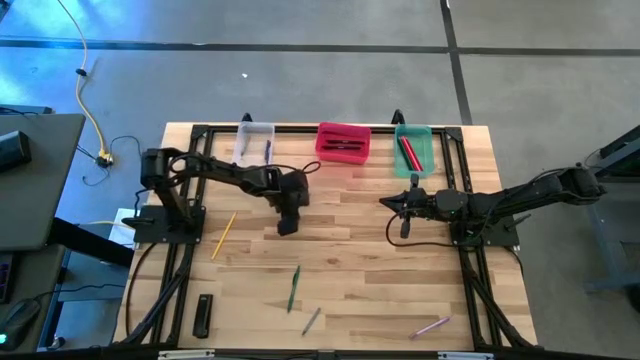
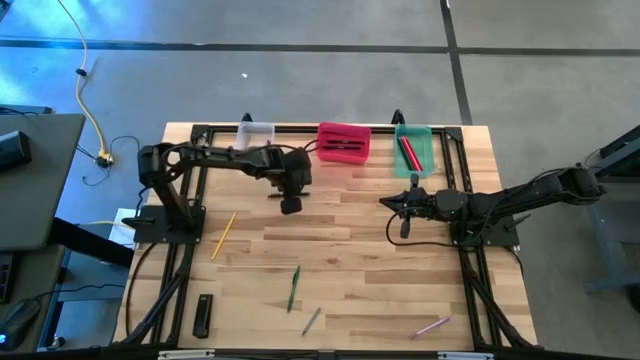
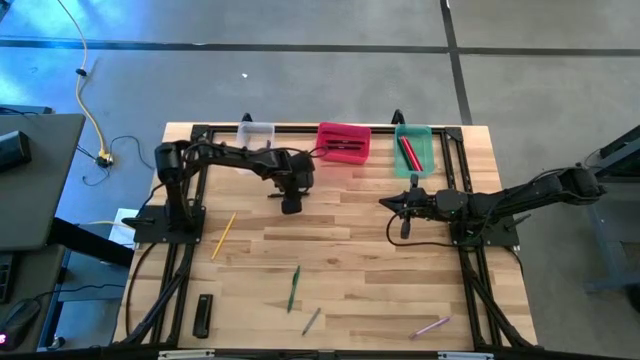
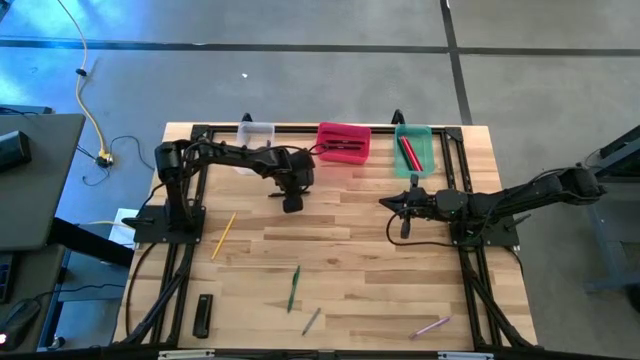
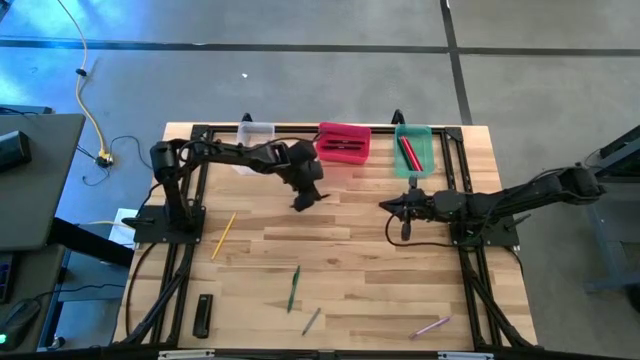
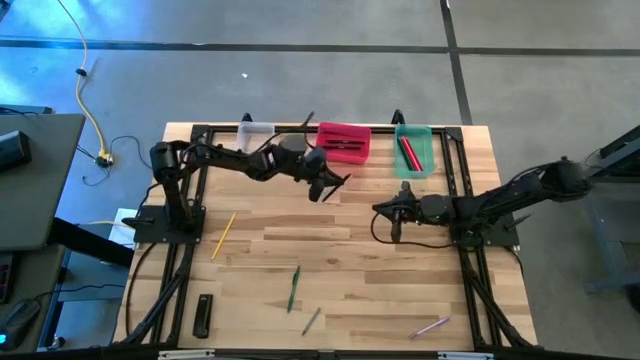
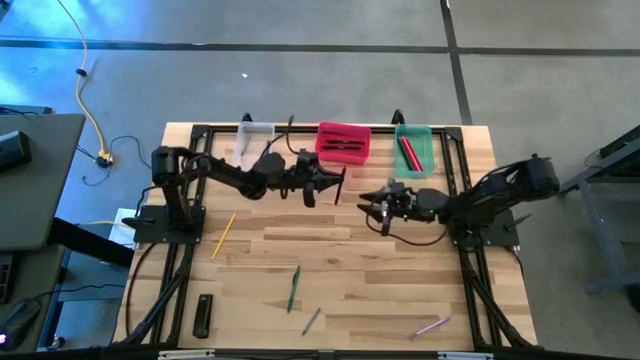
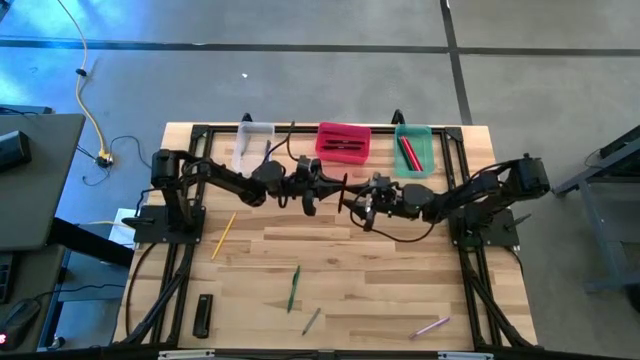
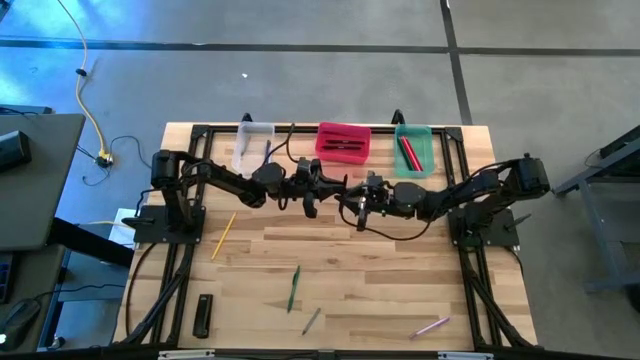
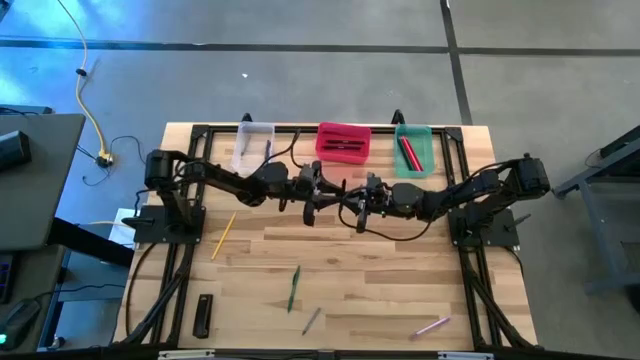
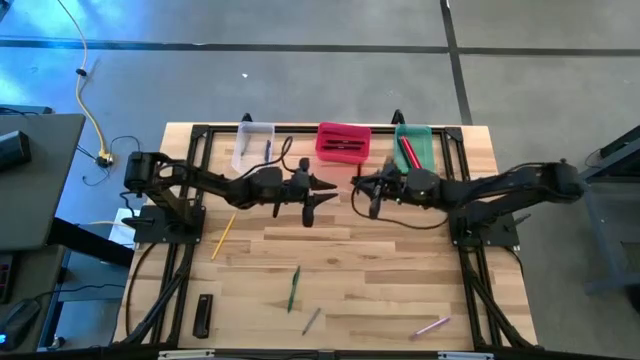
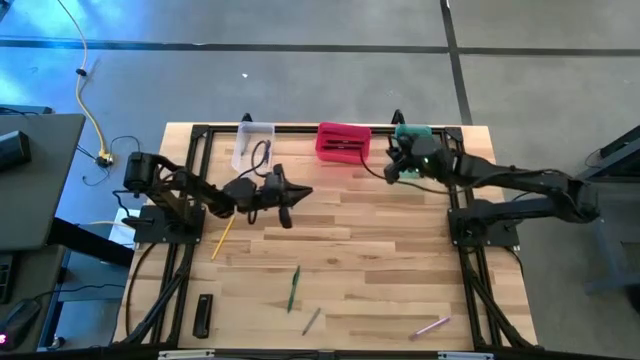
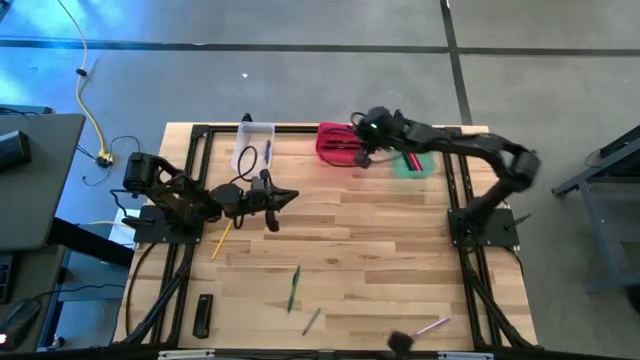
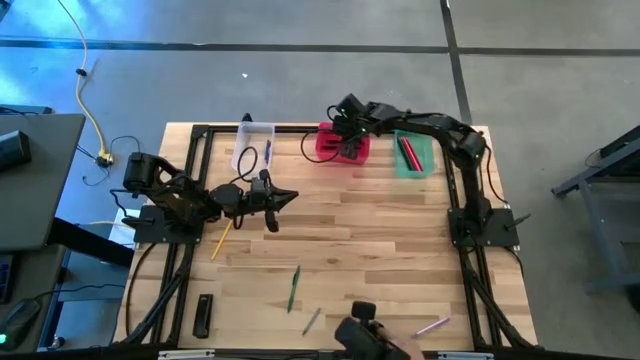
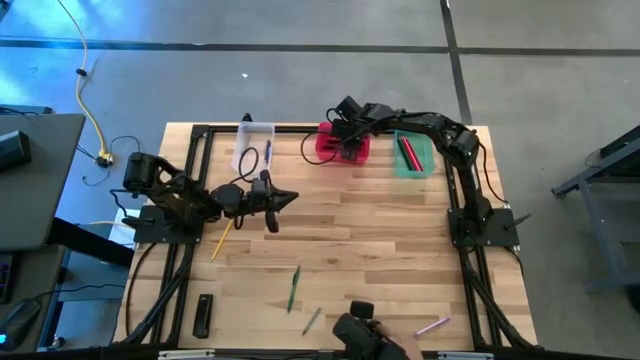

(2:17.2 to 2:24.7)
Task: Sort crayons/erasers/pens/pencils in bins
Put the black pen into the red bin

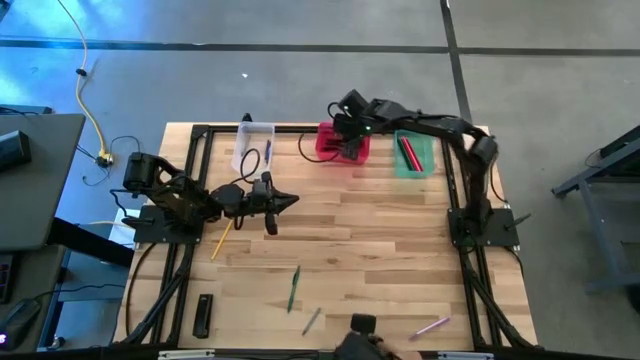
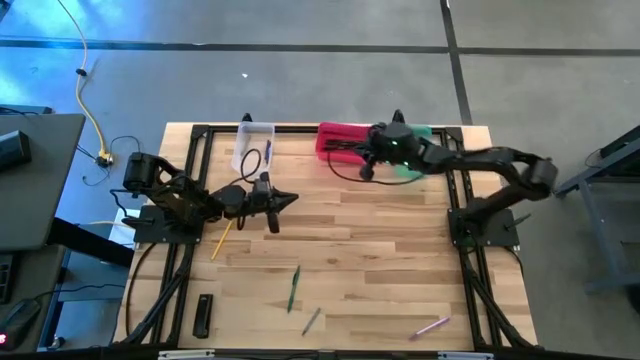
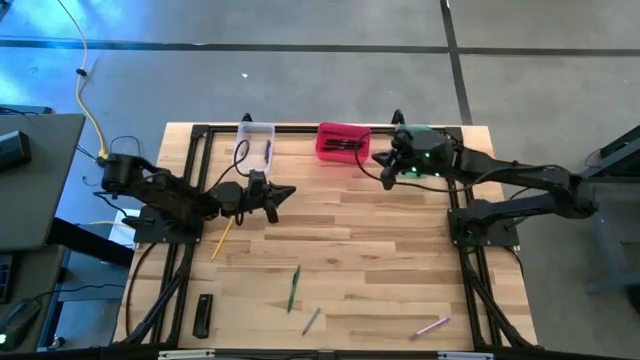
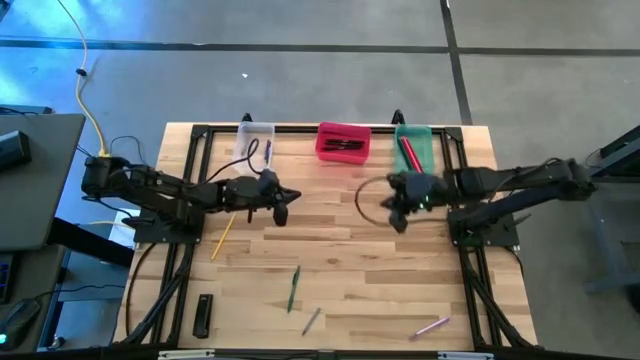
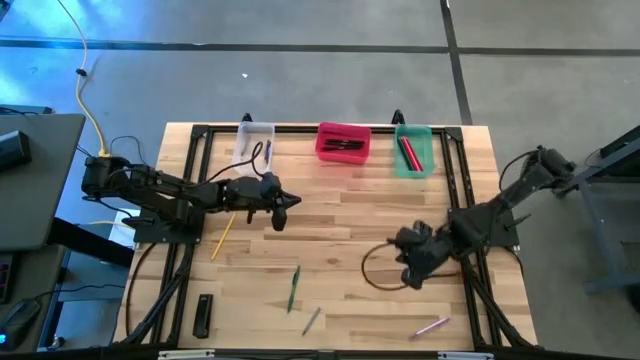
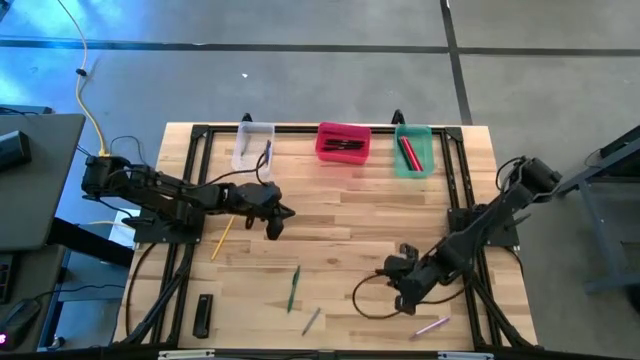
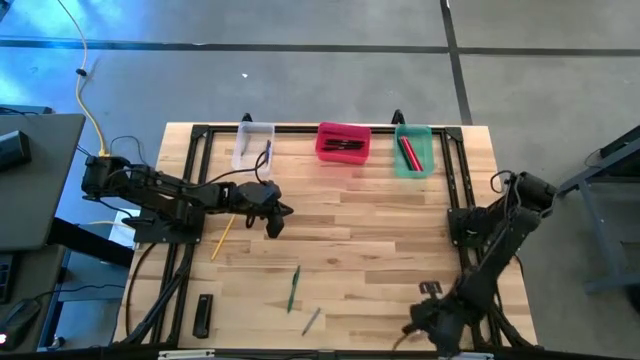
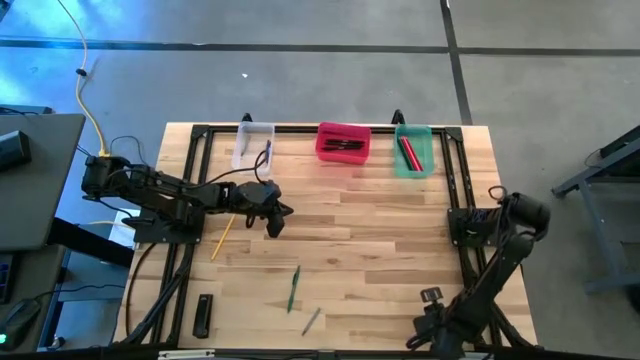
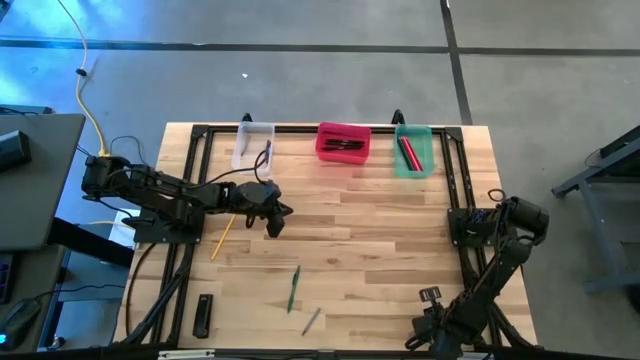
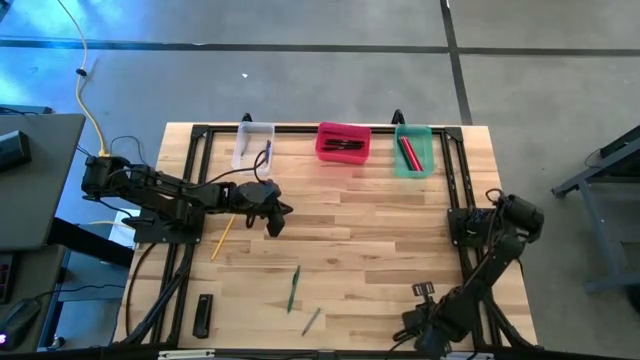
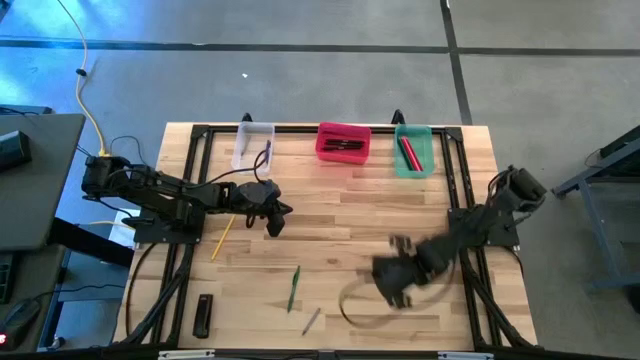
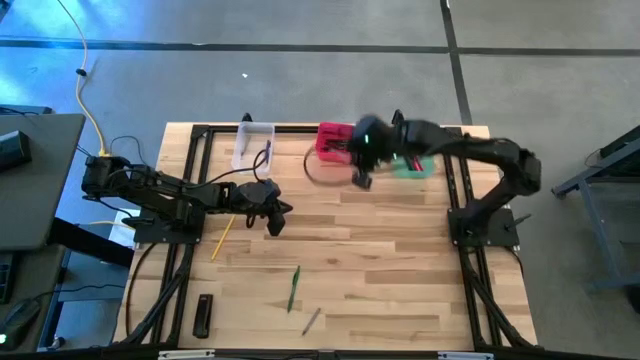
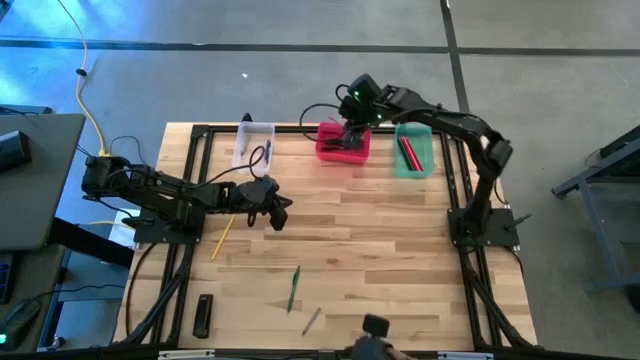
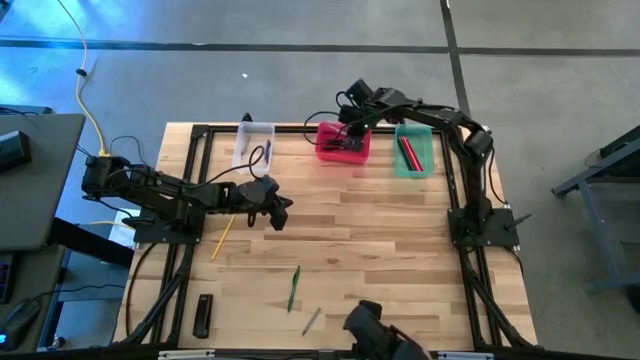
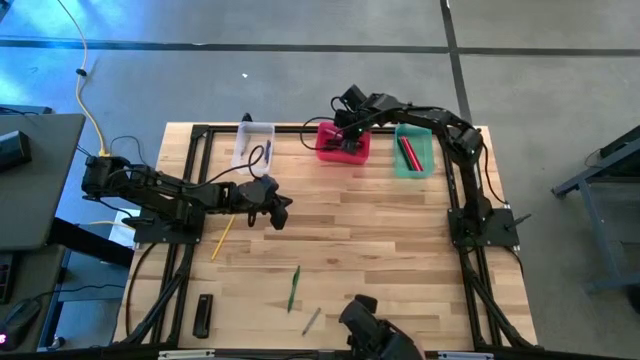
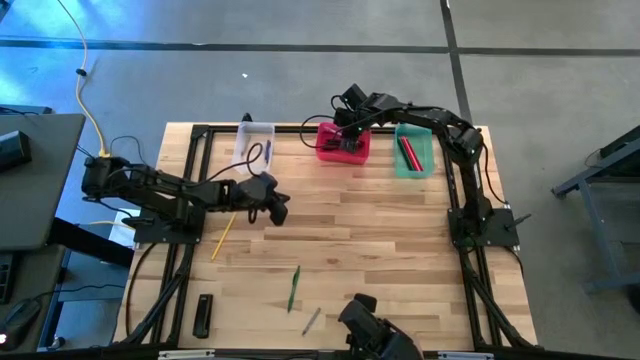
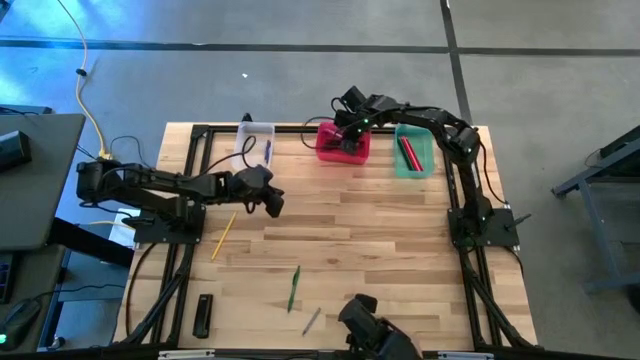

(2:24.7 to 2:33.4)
Put the pink pen into the red bin

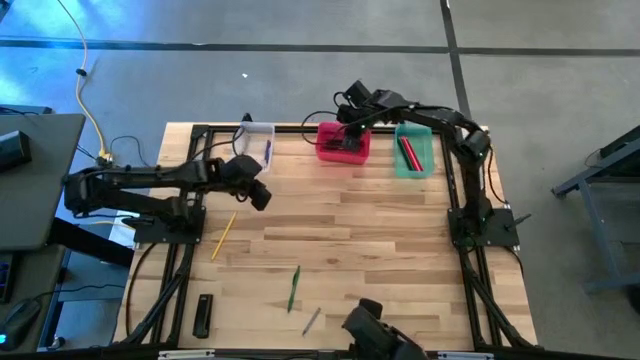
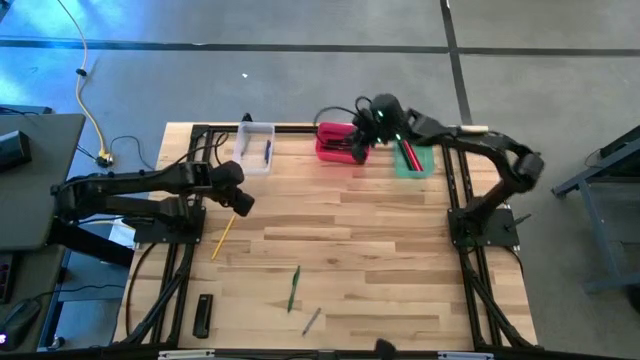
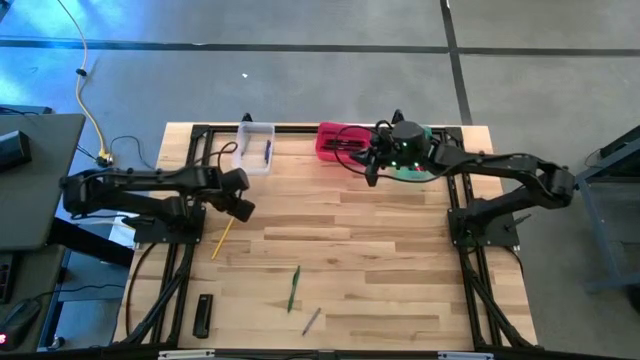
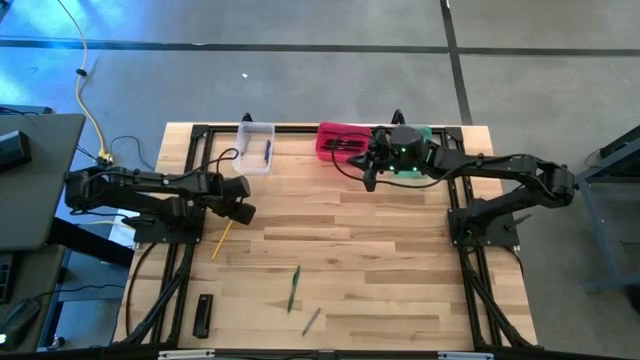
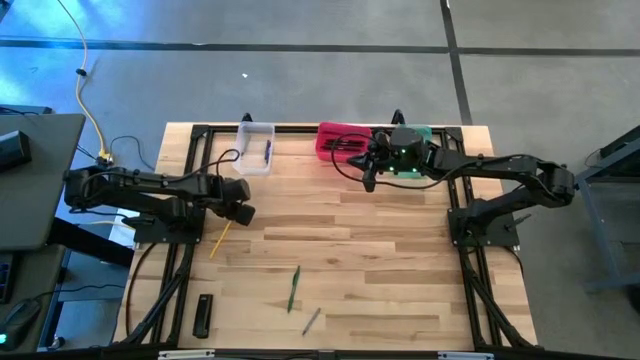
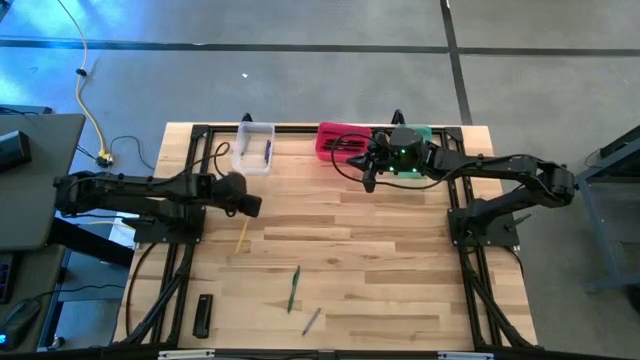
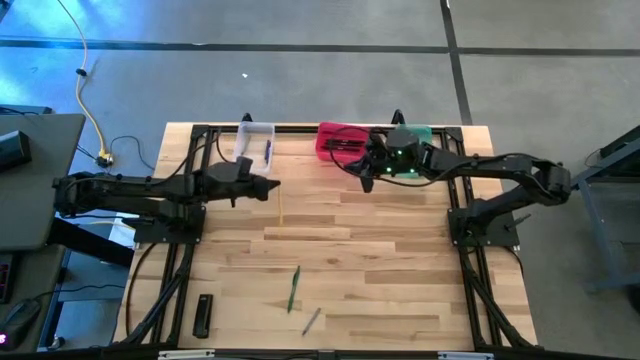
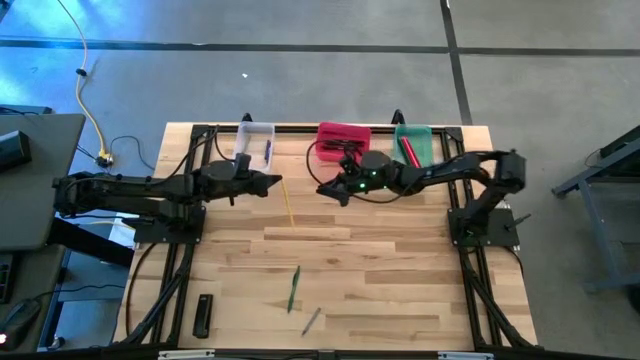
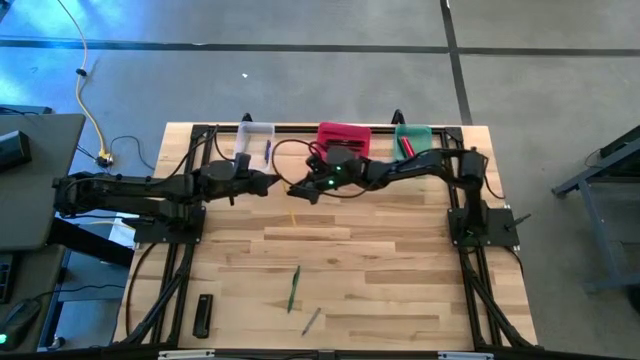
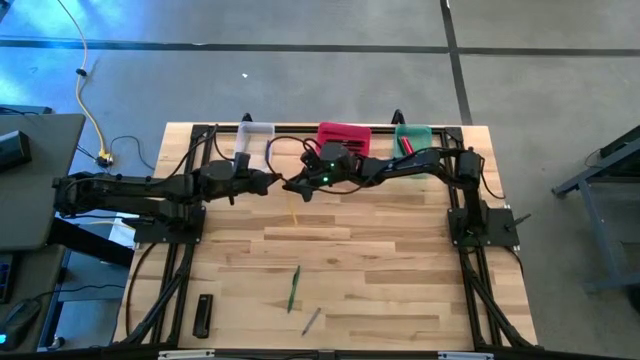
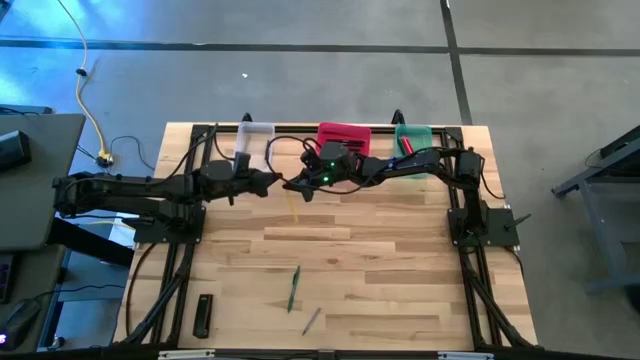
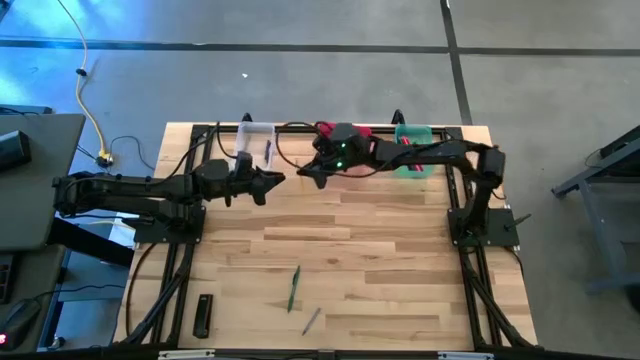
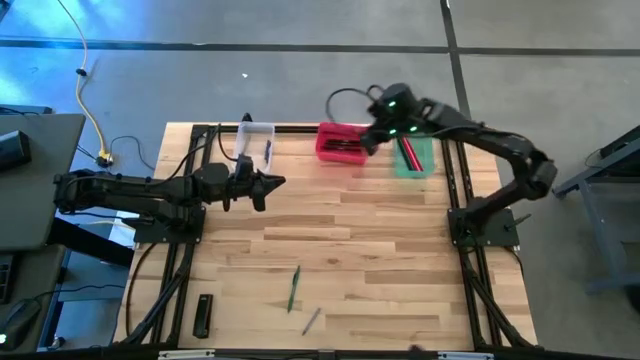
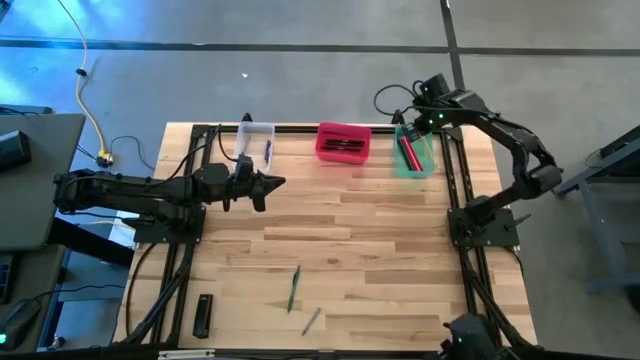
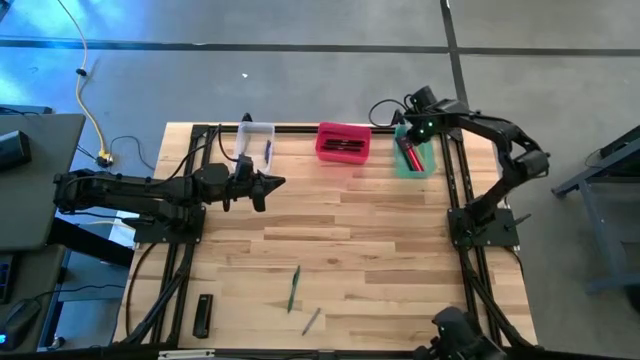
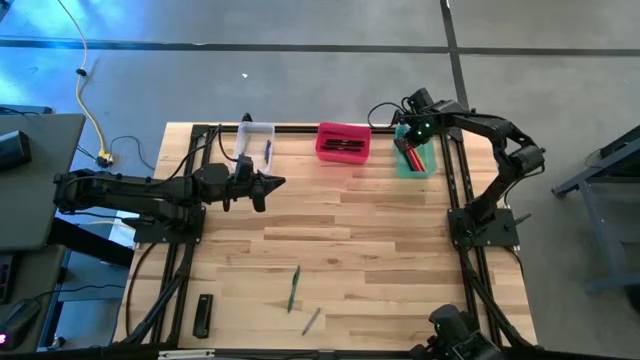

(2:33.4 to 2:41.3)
Put the yellow pencil into the blue bin
